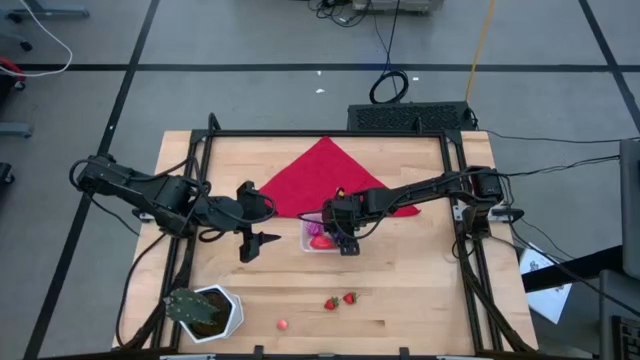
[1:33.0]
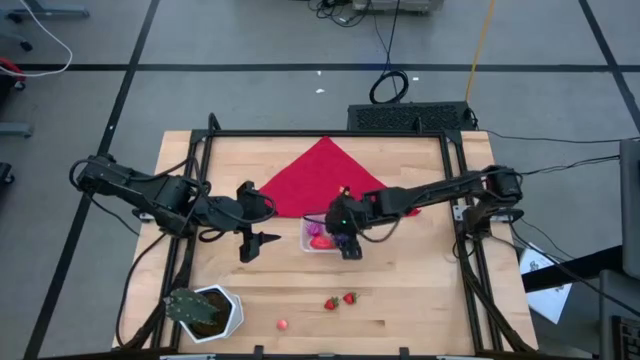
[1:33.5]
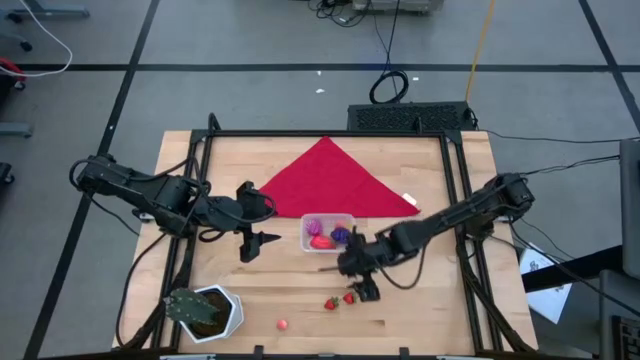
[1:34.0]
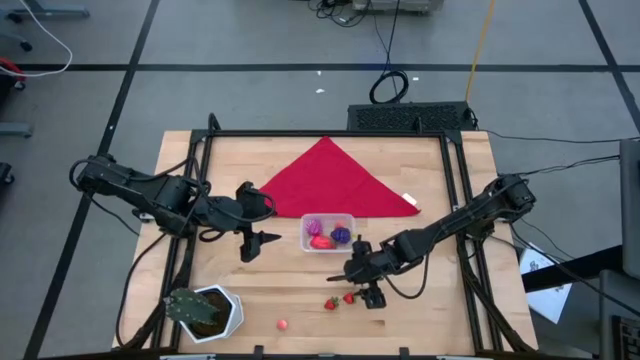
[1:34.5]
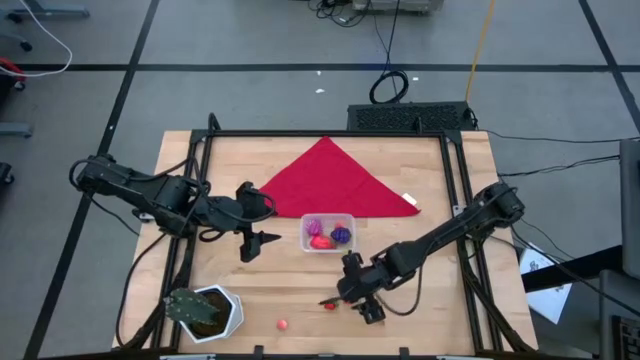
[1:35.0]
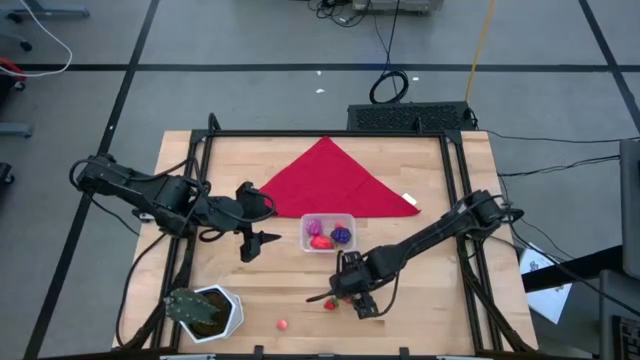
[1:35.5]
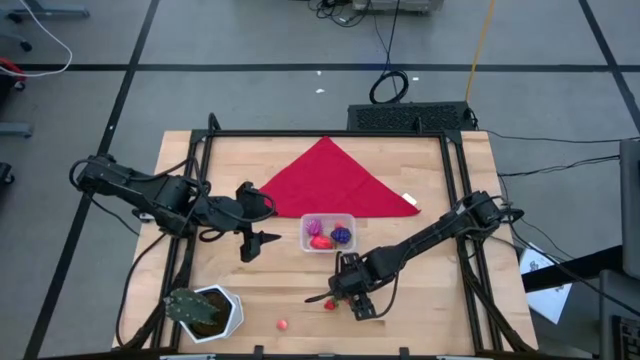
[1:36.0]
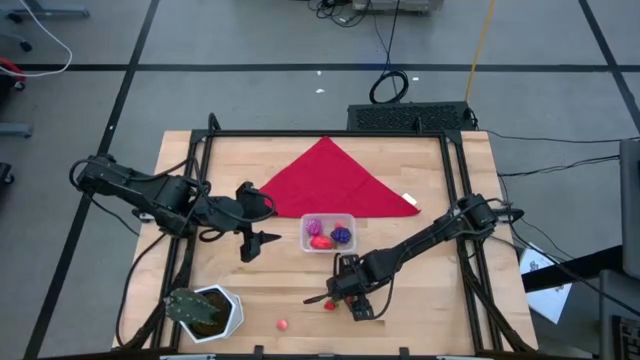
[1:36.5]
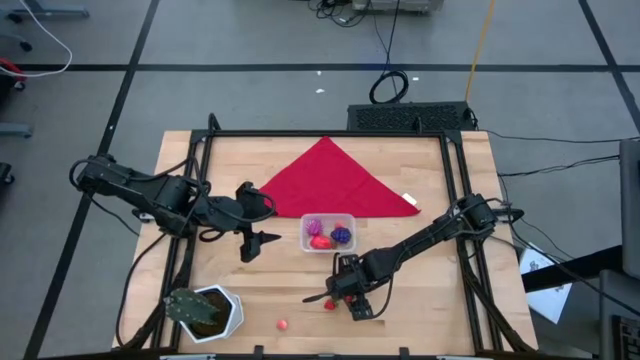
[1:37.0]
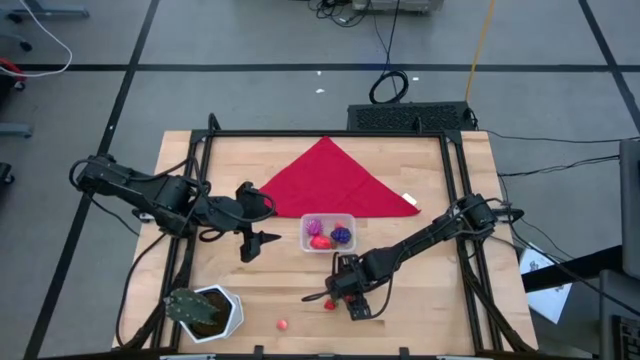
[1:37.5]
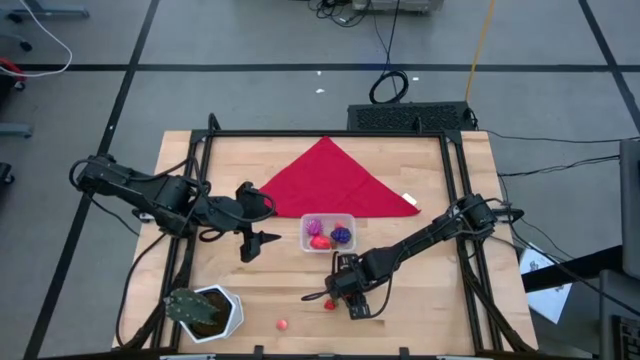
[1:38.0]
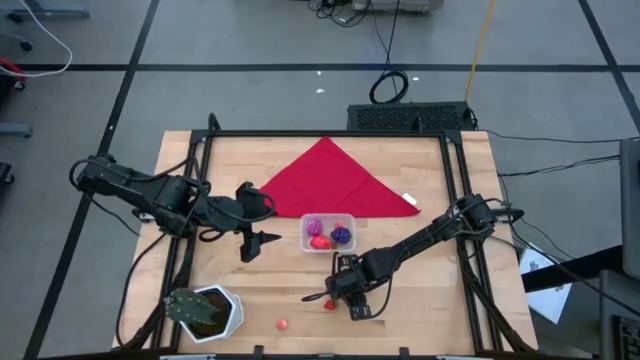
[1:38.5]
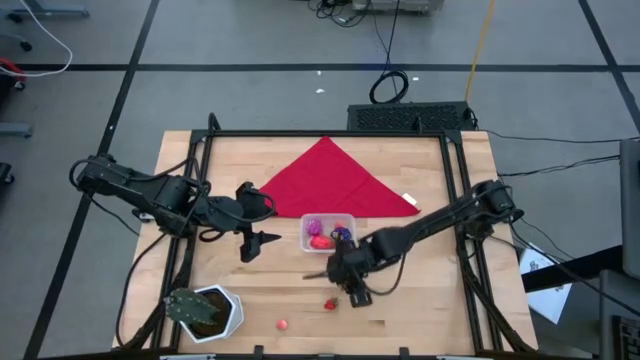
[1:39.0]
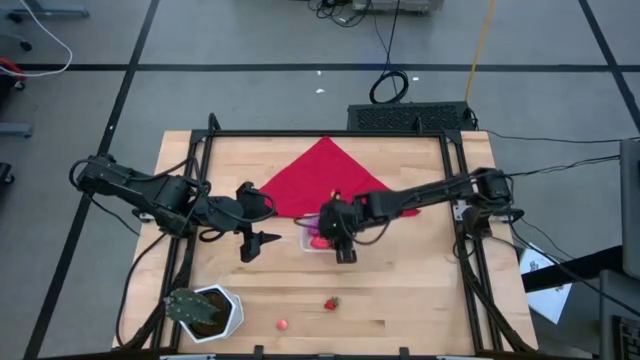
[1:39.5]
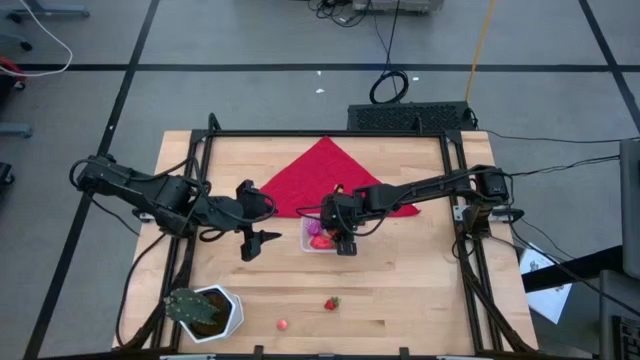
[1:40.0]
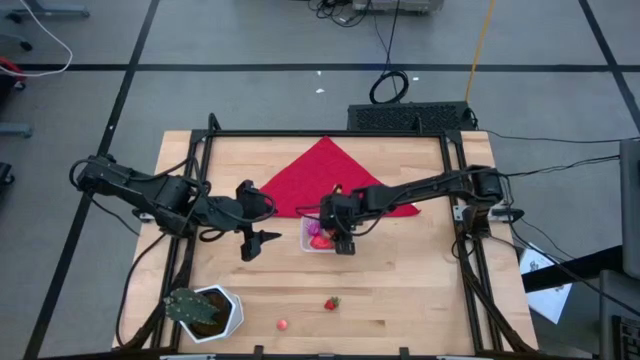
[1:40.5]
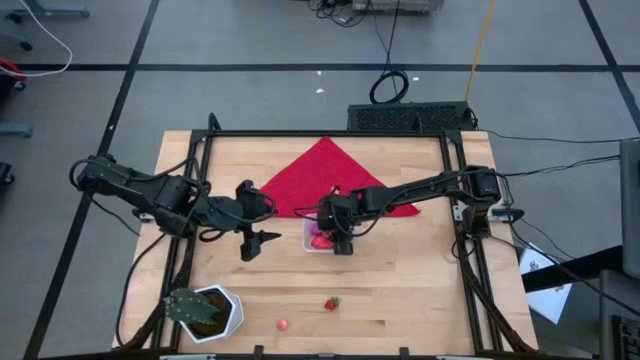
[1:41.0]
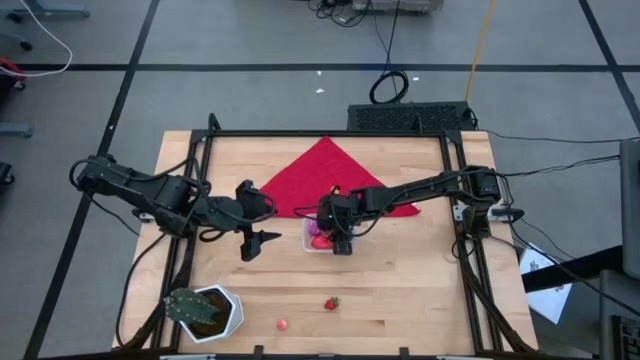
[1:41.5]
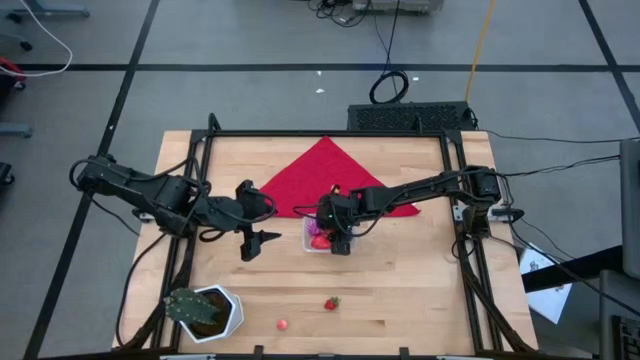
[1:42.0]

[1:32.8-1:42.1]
Task: Pick and placing Produce into tupperware
Put the right red strawberry in the transparent bin

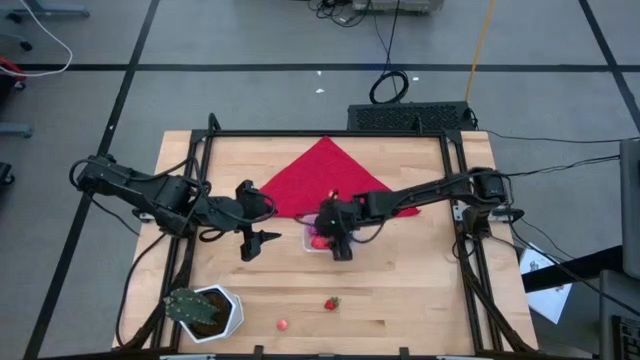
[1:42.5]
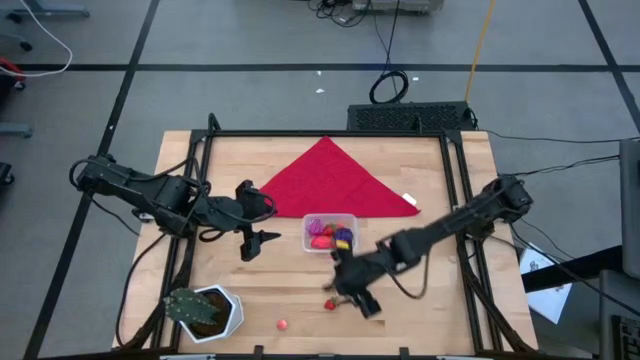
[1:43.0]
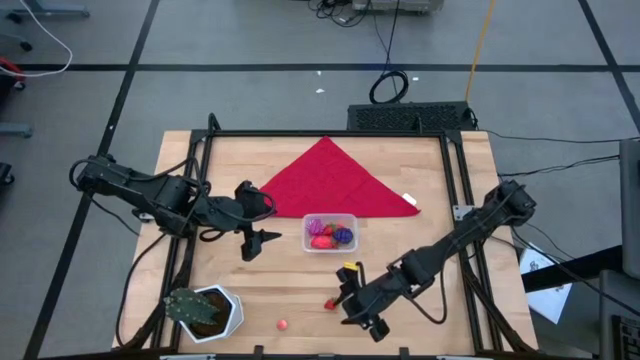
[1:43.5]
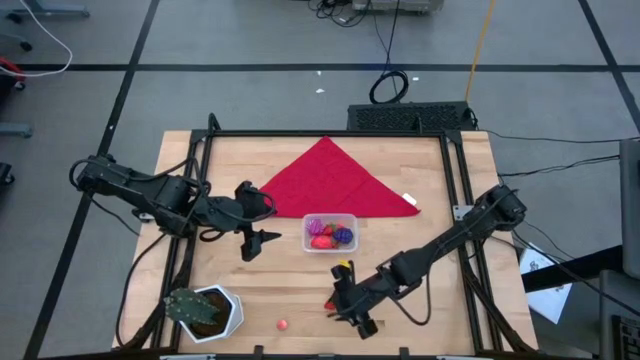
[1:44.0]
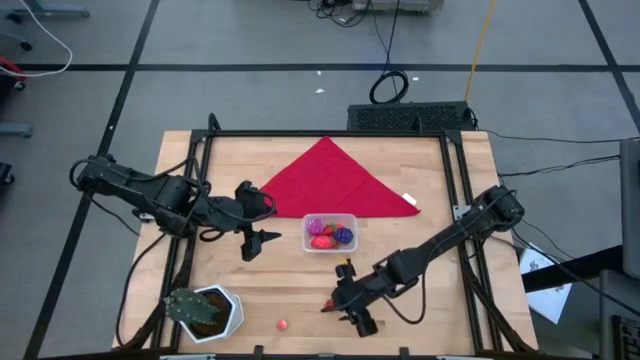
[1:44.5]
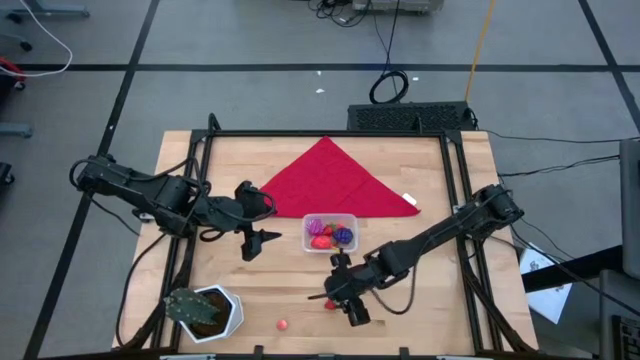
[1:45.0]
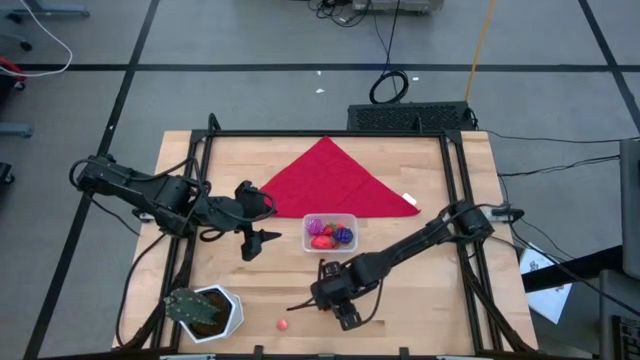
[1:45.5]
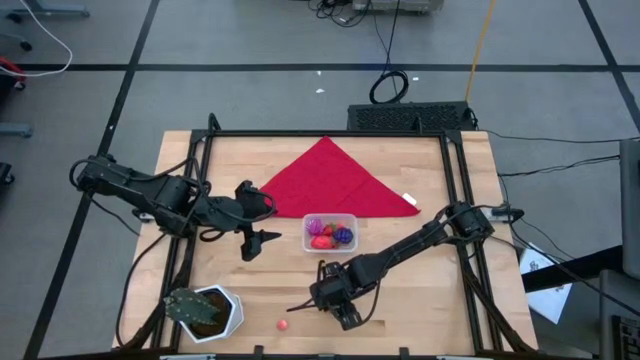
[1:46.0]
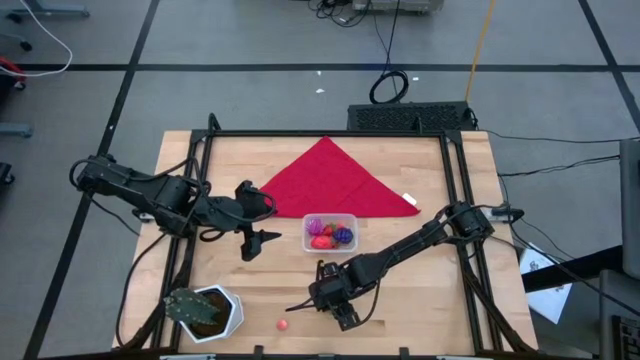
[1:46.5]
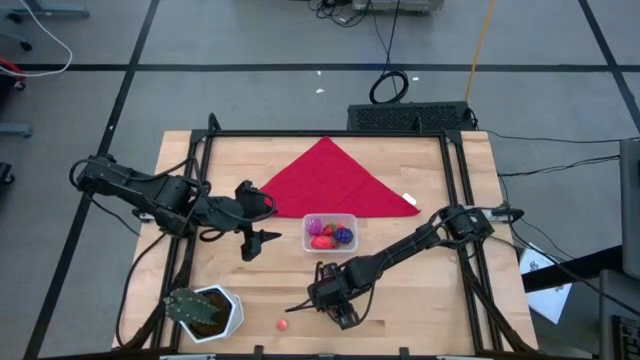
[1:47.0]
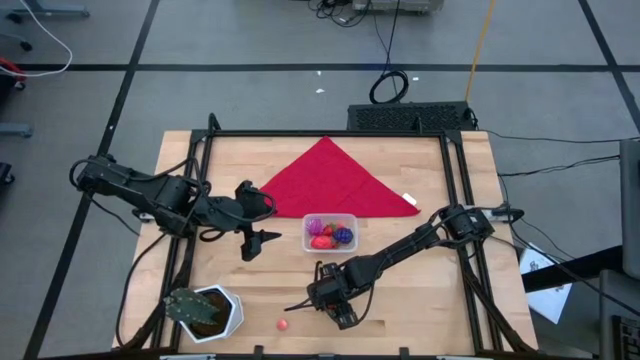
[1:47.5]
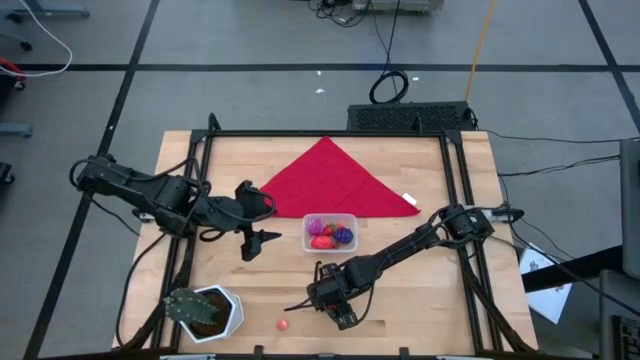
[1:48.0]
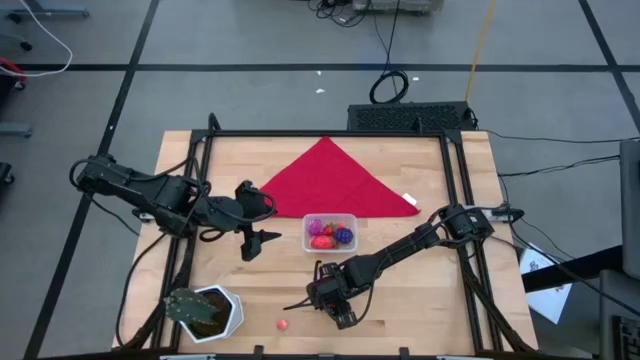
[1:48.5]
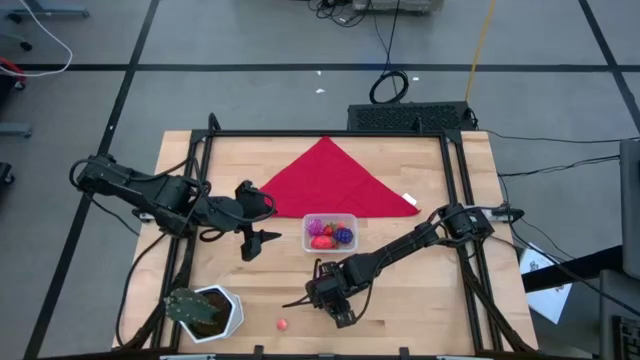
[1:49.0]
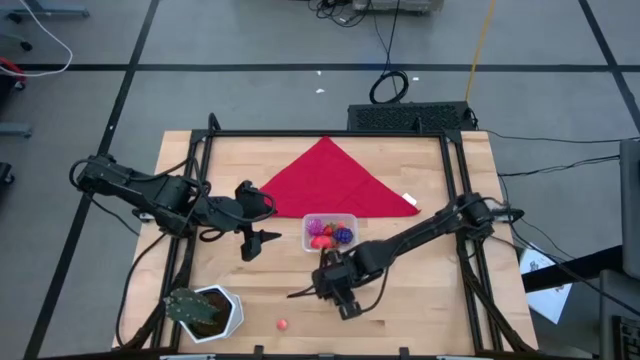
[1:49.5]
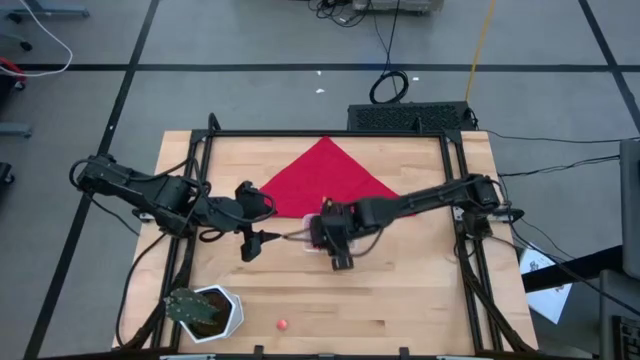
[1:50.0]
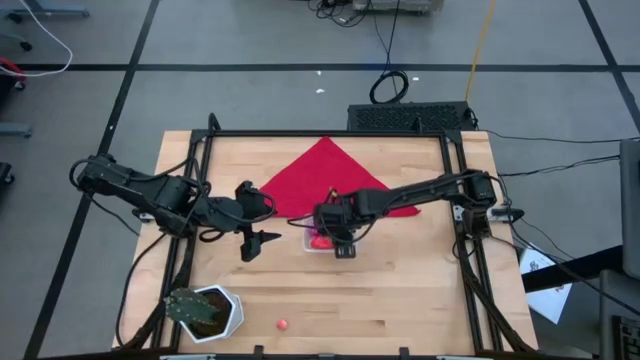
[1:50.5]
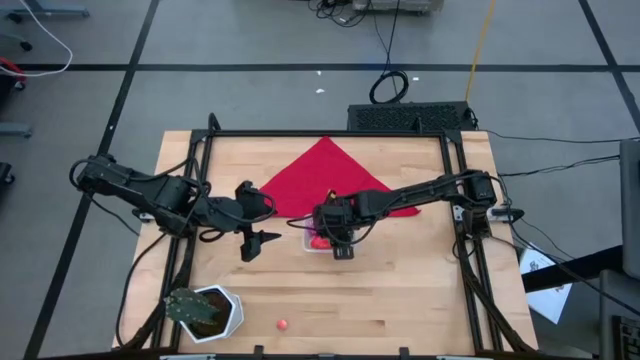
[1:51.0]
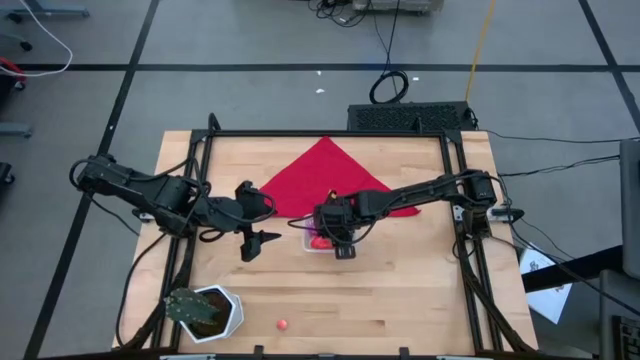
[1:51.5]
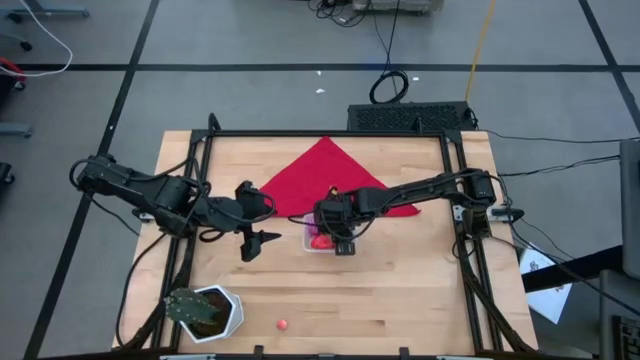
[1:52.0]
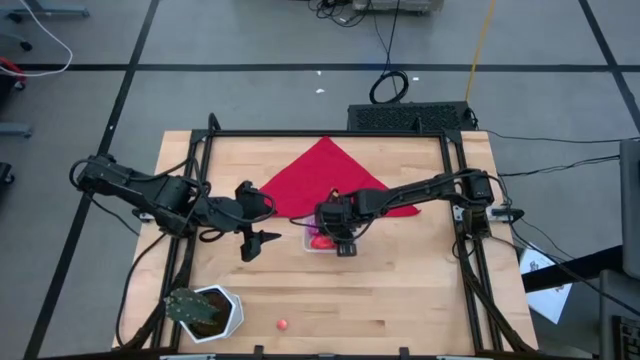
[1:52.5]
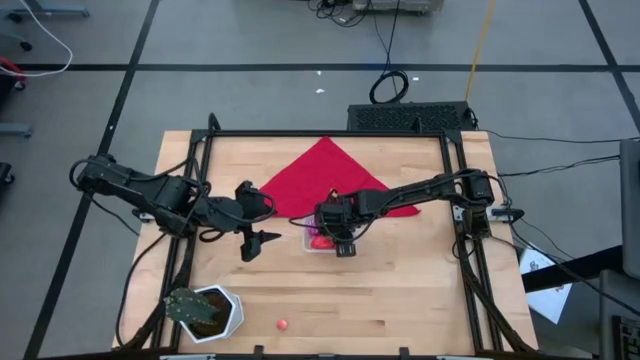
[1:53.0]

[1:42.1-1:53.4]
Put the red strawberry in the transparent bin

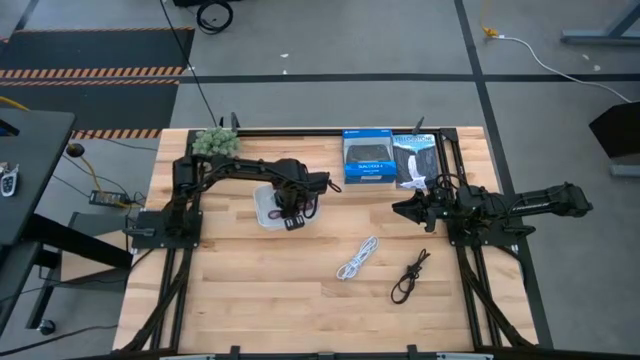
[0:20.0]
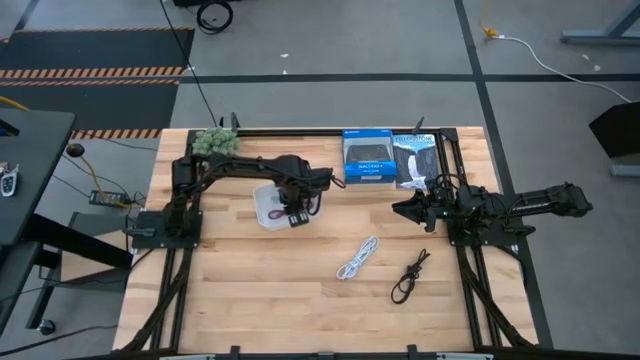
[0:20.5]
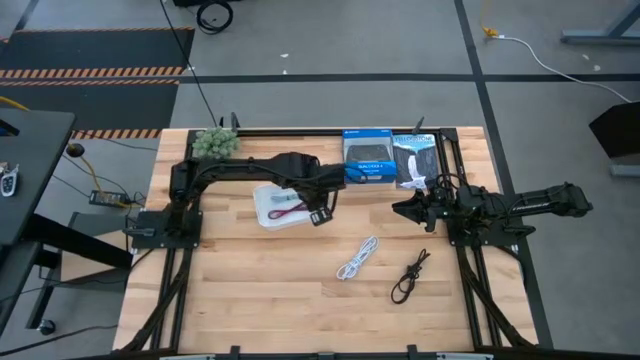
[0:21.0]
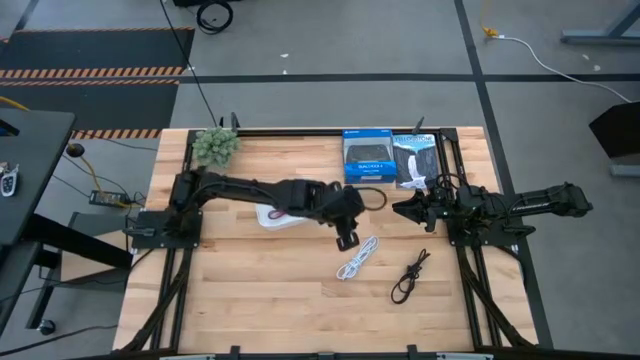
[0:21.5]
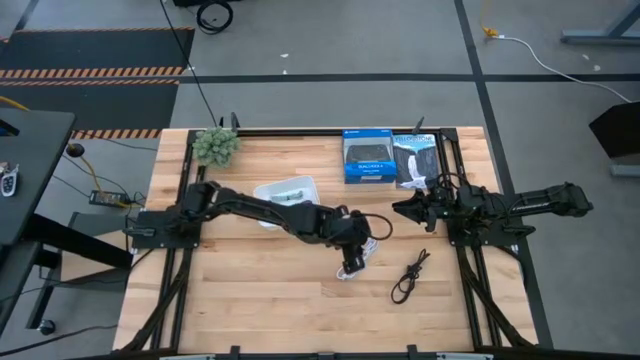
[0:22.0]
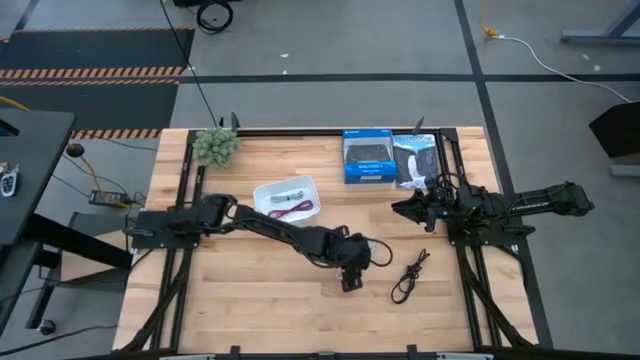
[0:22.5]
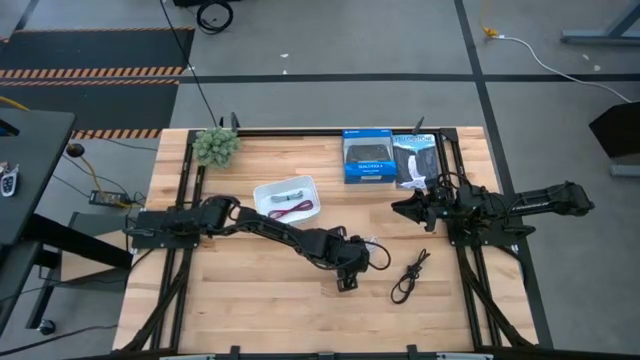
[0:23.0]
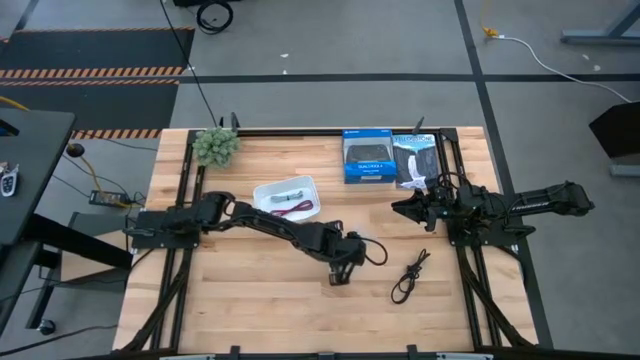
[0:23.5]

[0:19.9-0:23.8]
Task: Pick and place USB-C Cables
Put the white cable charger into the white bin
